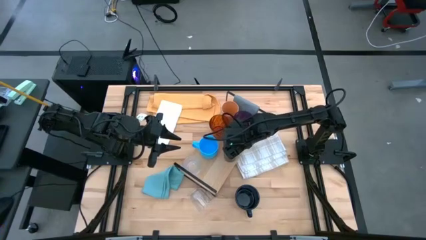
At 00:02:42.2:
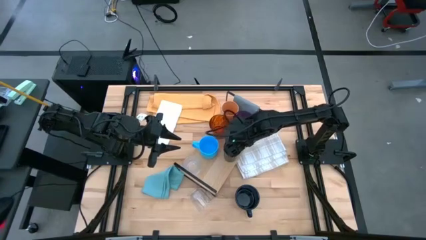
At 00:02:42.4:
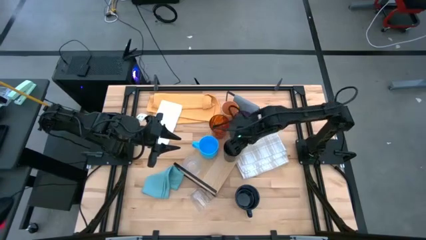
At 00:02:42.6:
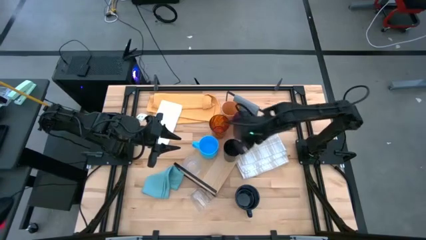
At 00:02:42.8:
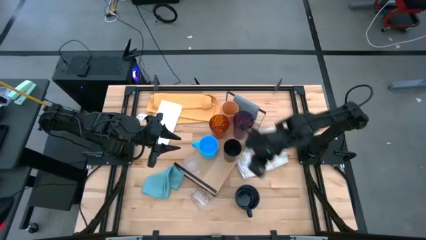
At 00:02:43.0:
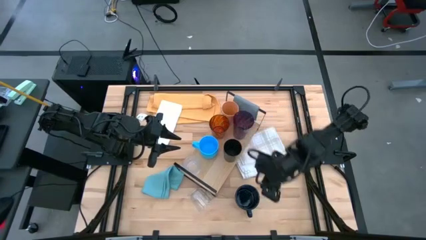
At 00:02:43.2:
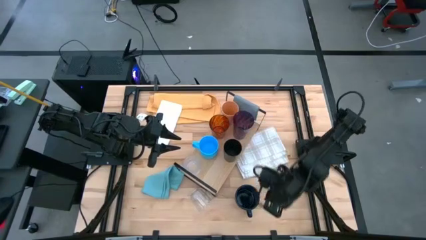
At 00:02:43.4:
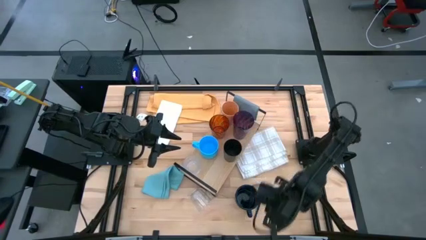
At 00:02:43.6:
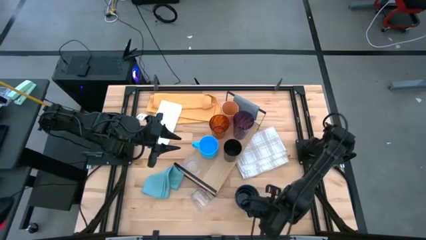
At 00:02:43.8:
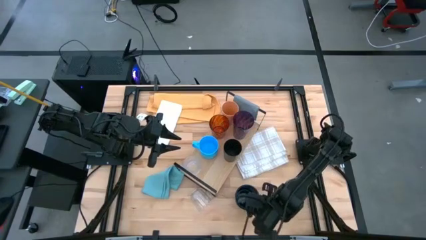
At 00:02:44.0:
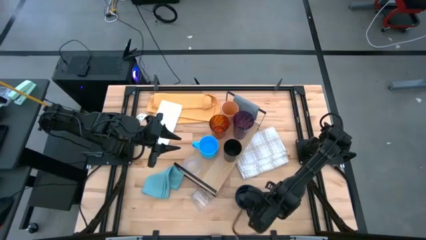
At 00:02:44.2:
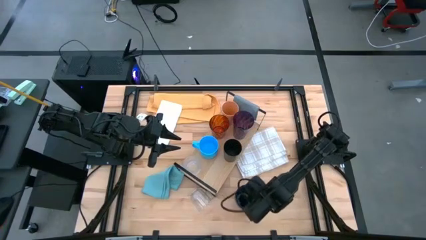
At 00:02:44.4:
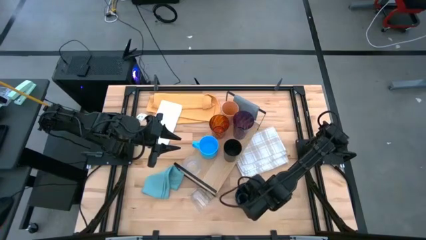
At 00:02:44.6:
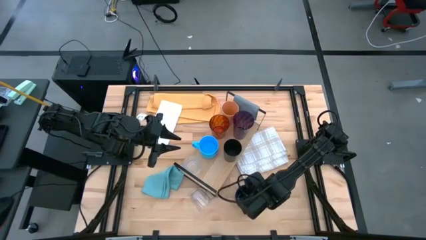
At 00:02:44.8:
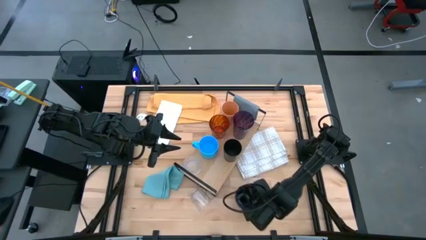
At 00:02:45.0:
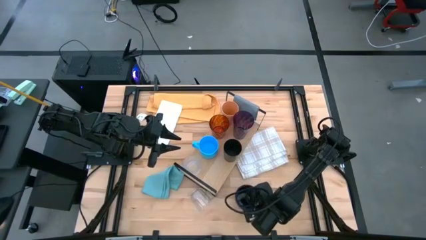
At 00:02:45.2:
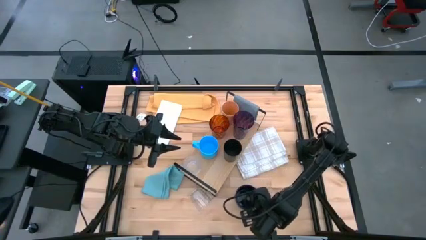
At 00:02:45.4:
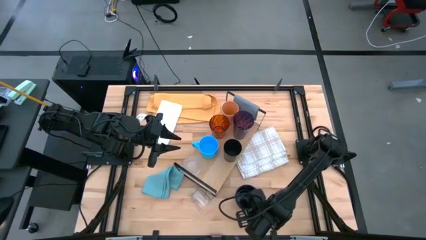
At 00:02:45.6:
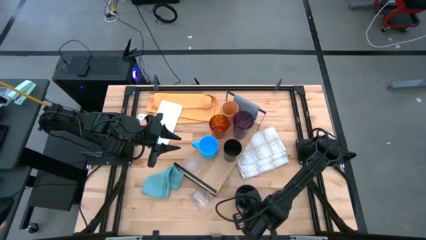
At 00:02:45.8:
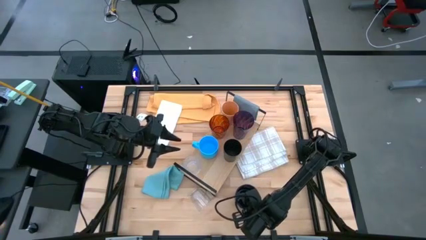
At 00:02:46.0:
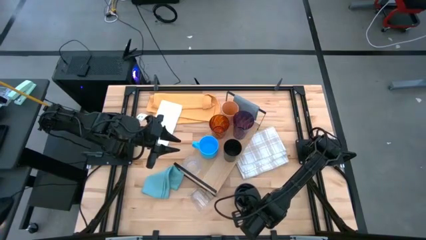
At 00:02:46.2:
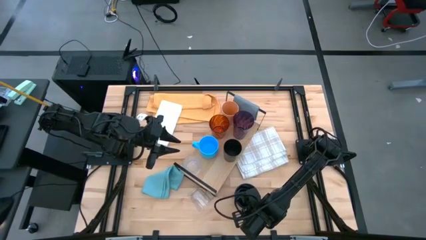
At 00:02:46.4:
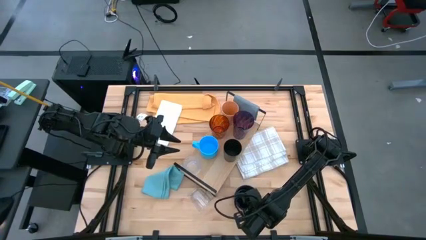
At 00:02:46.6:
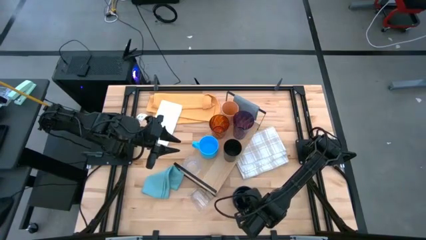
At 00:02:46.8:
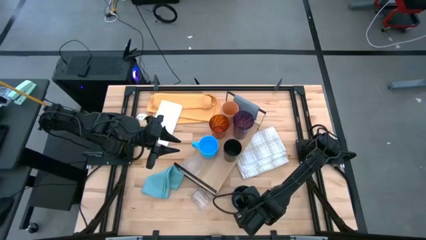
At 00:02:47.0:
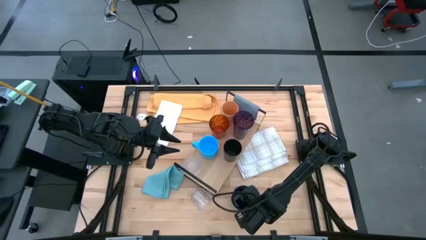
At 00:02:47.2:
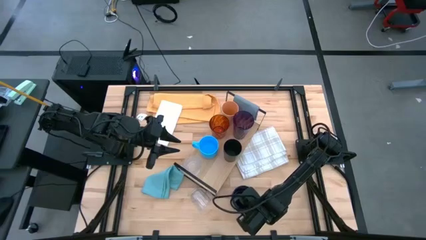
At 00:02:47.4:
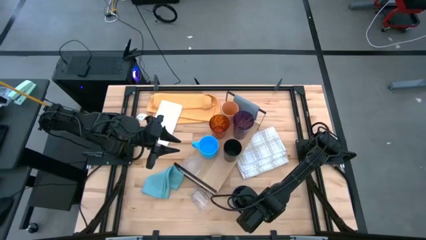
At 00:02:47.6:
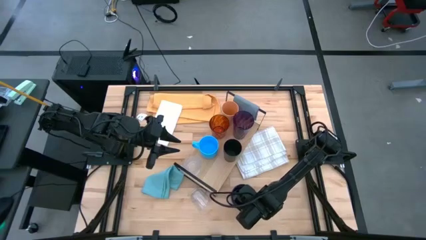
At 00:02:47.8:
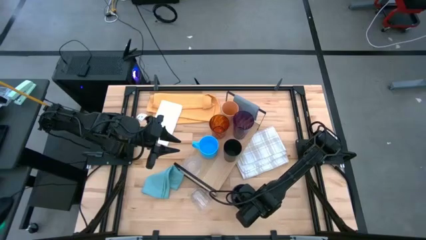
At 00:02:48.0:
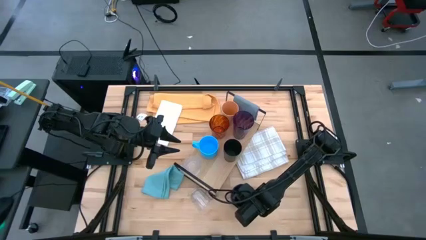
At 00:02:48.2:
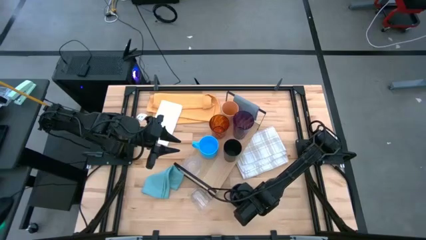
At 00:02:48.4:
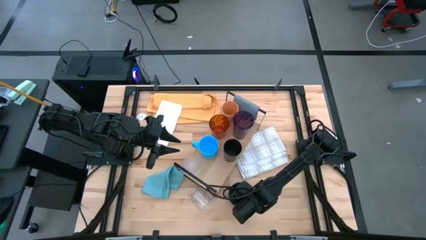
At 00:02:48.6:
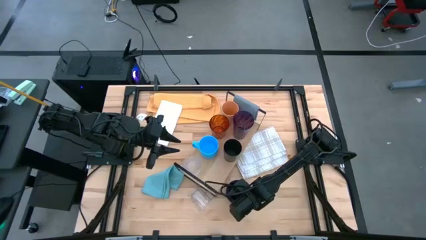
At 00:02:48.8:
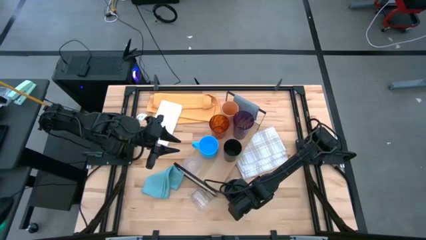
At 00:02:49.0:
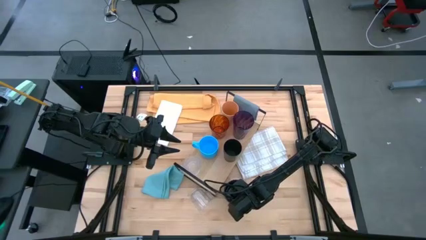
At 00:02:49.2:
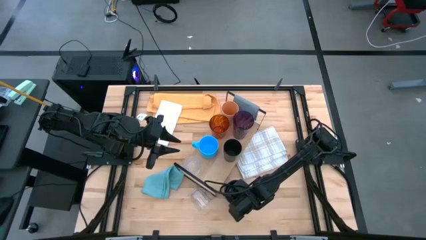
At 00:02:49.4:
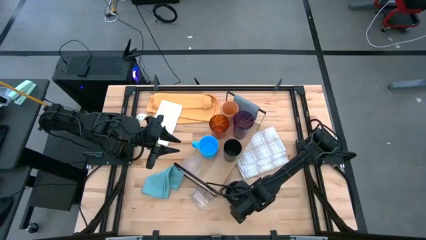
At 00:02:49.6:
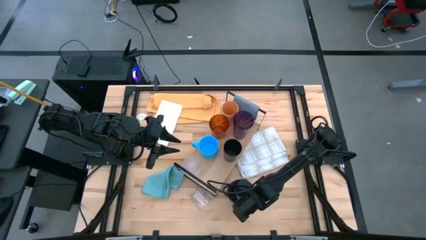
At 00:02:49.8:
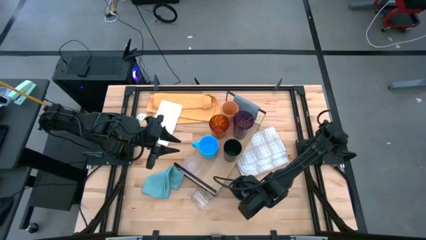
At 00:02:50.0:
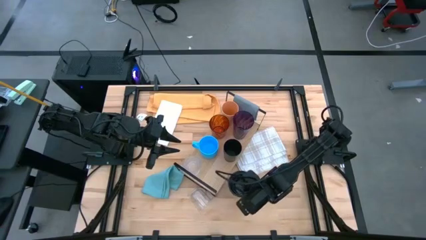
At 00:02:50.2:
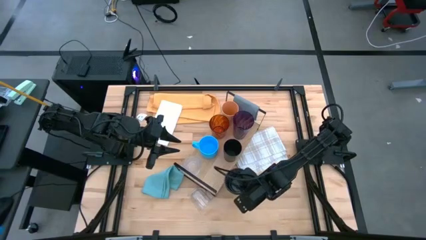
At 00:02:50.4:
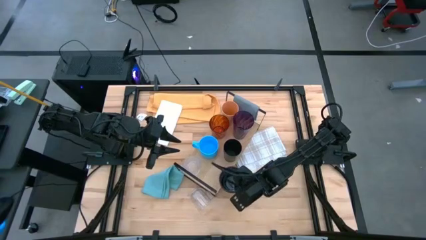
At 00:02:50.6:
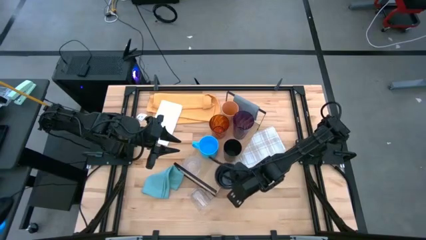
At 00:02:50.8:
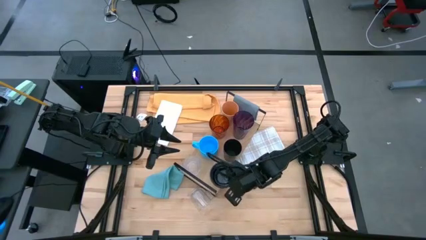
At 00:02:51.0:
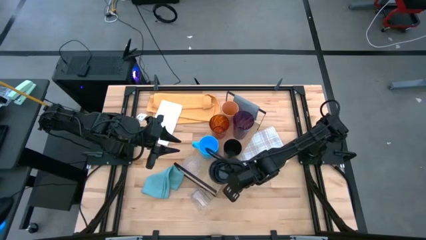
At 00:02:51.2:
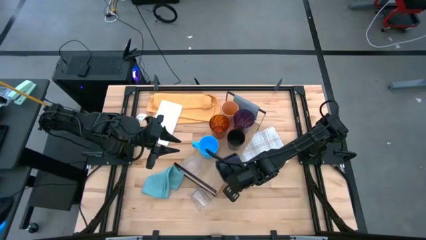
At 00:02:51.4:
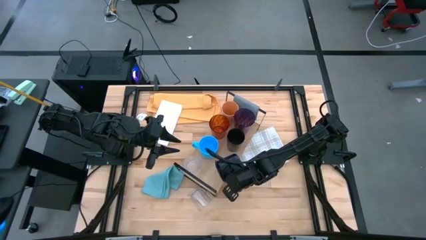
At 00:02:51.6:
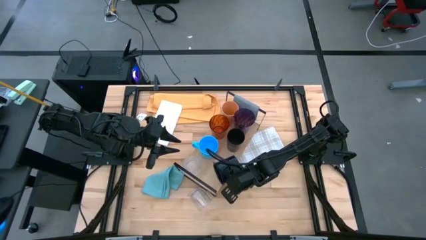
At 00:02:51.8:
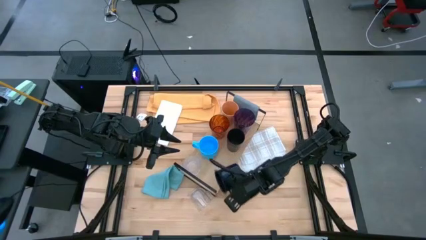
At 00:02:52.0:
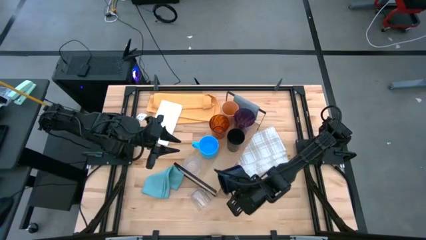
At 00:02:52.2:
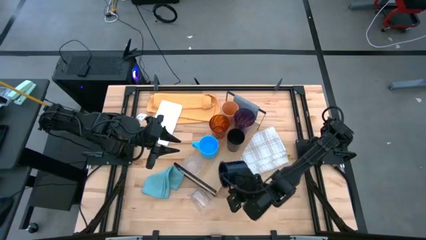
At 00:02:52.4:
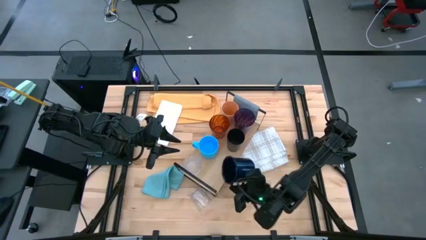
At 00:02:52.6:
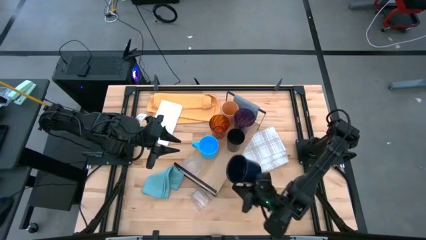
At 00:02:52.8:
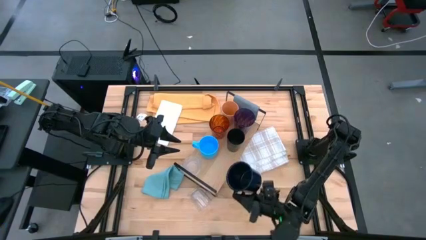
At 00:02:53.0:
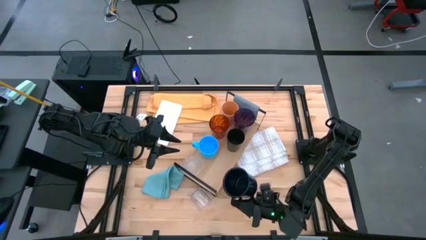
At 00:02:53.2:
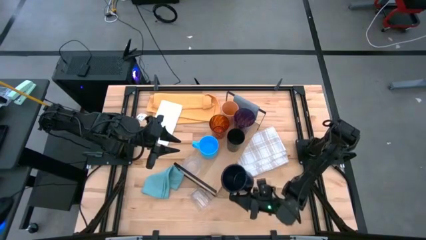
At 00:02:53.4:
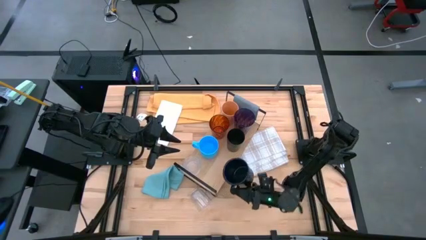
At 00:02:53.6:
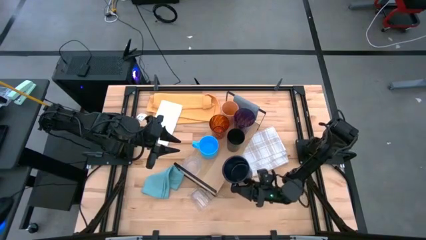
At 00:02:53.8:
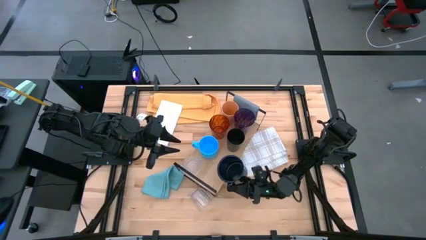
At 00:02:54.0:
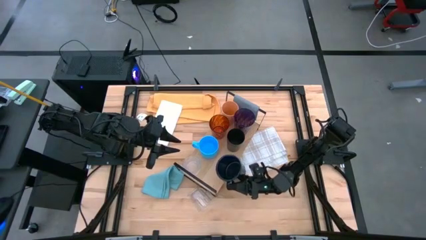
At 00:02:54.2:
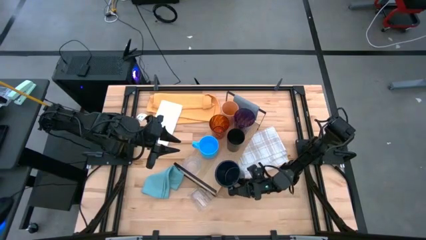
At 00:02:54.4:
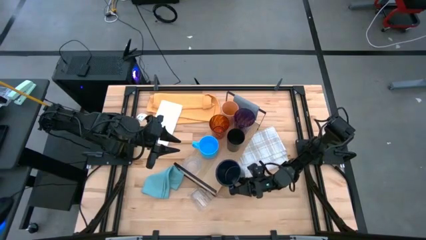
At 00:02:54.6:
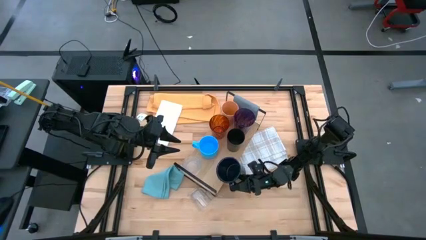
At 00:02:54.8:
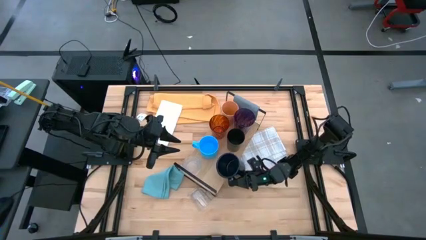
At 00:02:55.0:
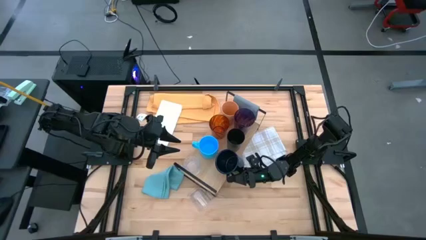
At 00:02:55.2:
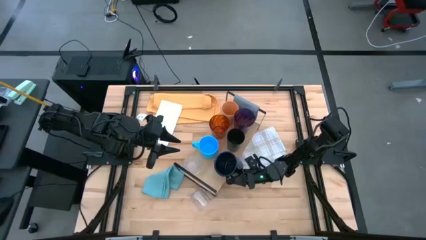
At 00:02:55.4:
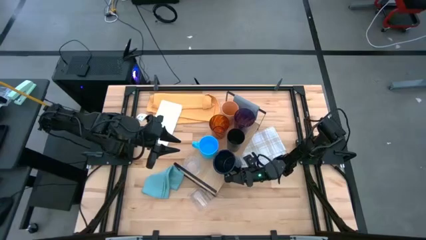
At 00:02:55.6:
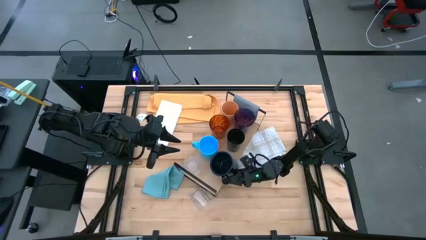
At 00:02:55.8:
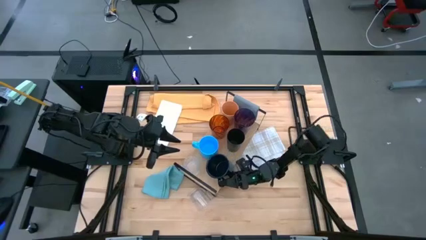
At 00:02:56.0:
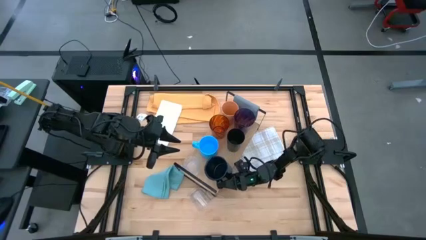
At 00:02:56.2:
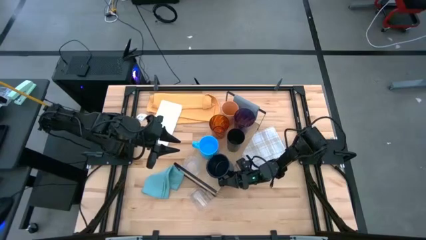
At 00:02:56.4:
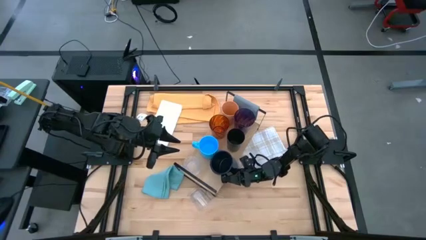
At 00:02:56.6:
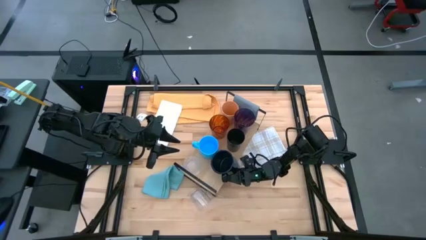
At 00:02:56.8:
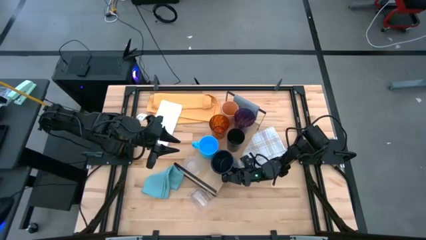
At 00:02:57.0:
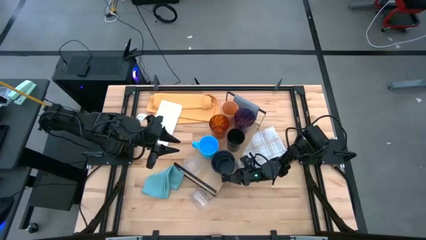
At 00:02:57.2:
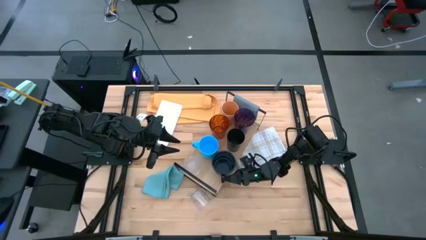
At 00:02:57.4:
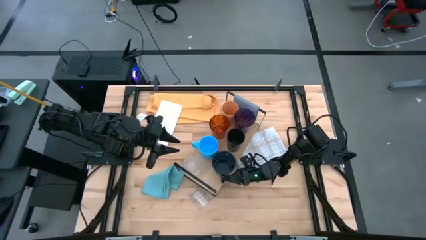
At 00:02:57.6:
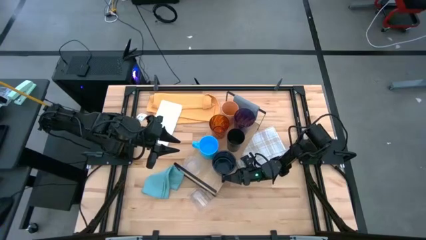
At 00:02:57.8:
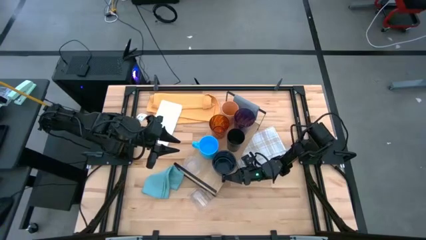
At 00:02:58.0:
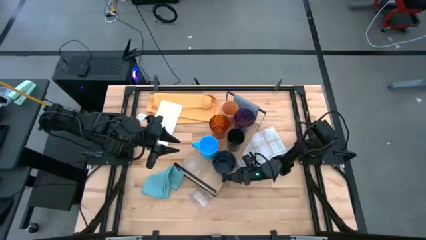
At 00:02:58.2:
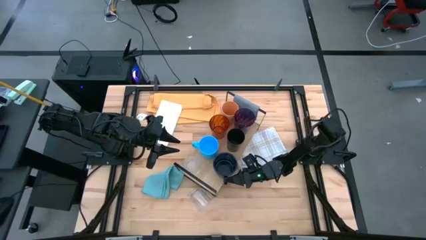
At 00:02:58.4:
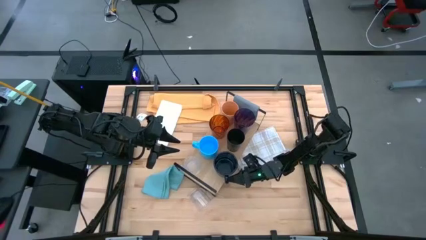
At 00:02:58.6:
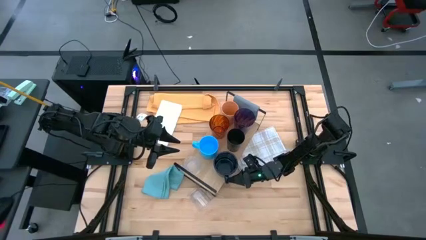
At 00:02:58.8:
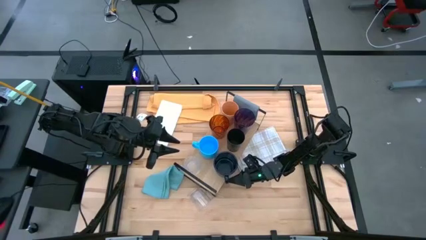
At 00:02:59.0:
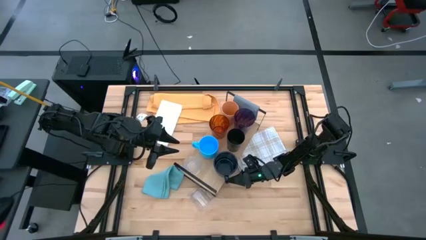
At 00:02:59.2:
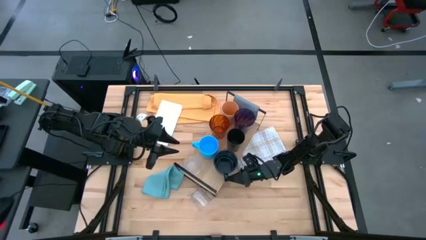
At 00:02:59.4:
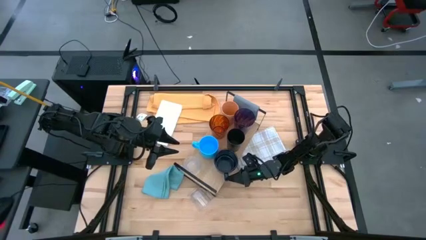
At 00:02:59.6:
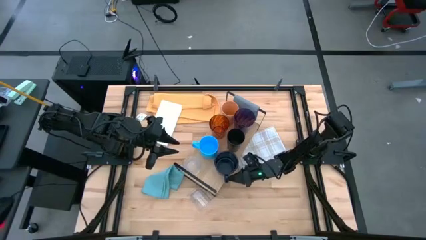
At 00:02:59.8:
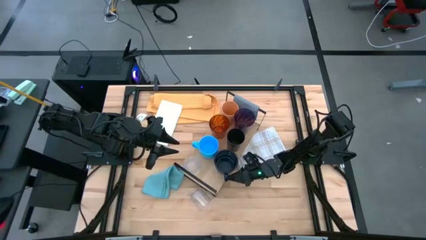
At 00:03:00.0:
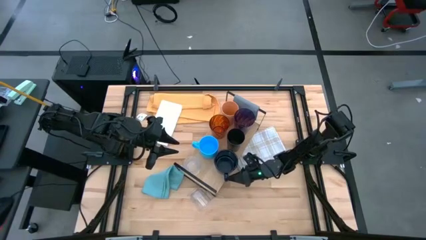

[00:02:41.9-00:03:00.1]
Task: Stack small to large cups/mugs on shelf
Put the dark blue mug on the shelf
